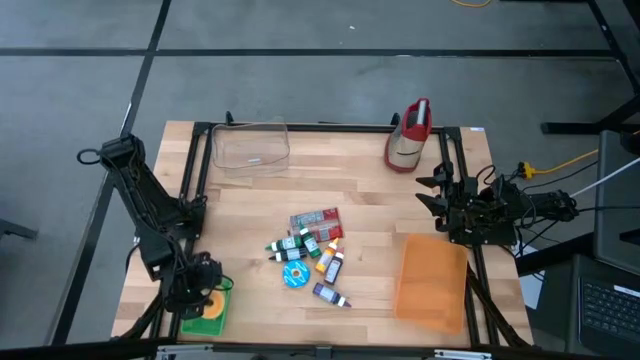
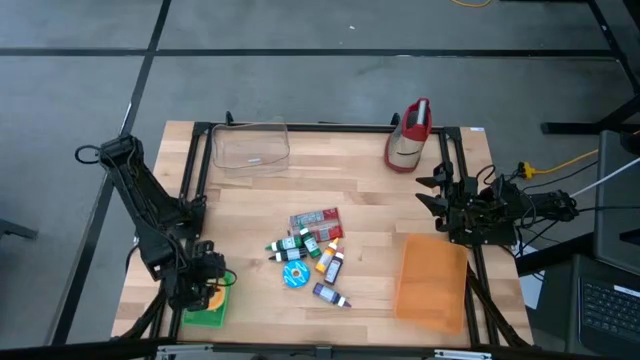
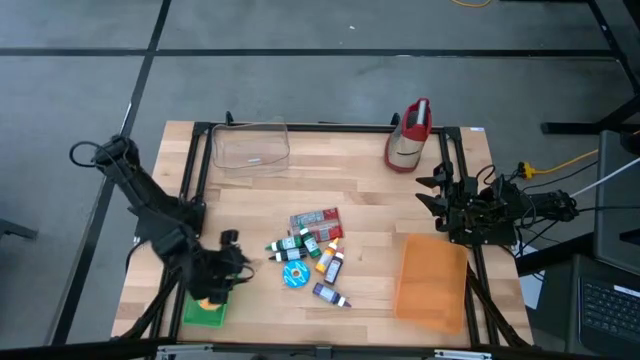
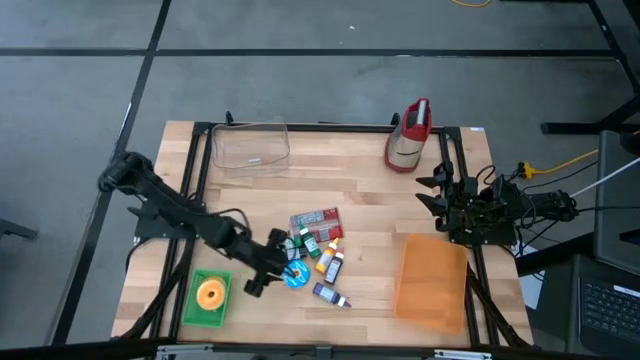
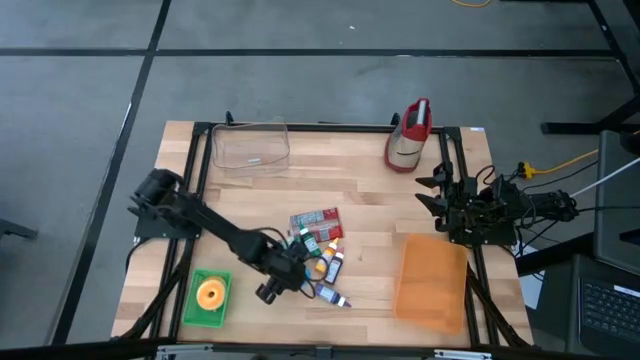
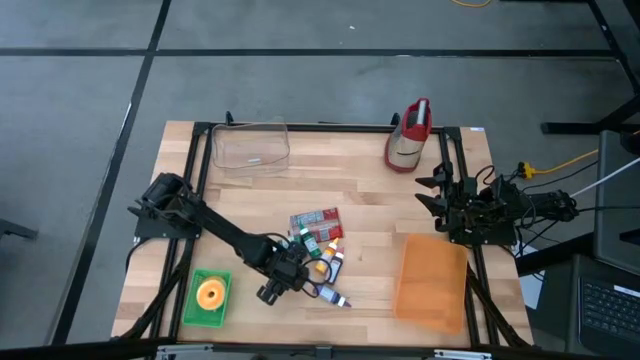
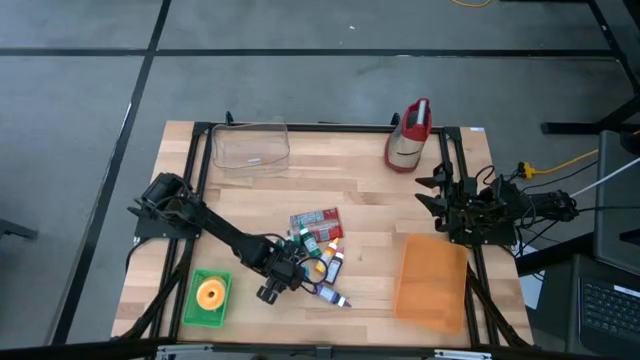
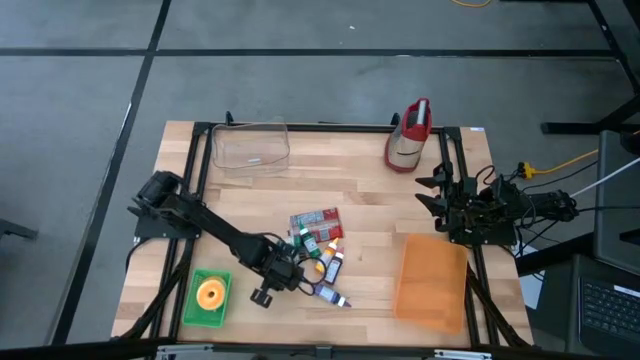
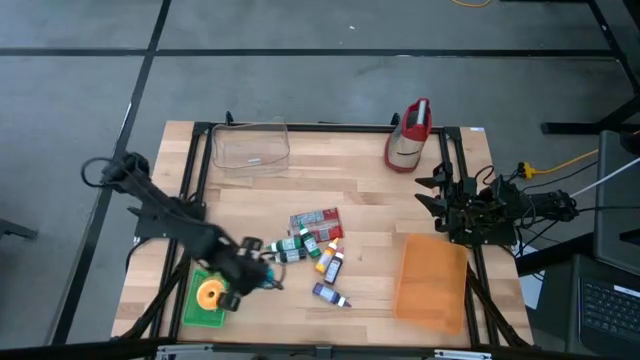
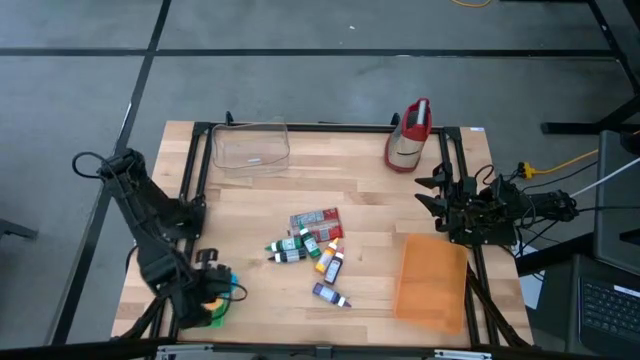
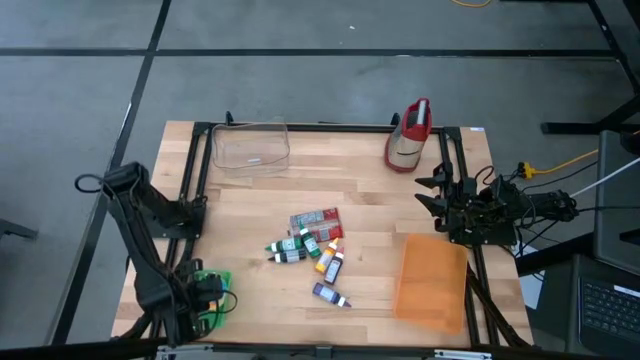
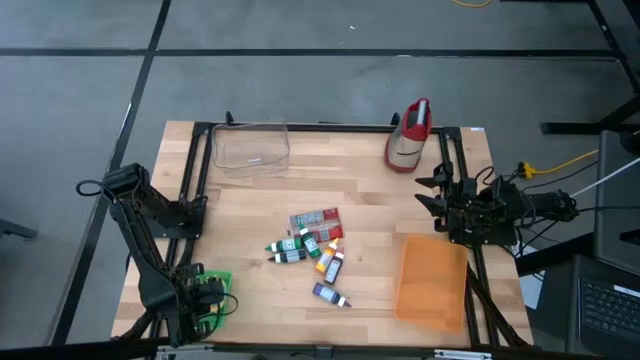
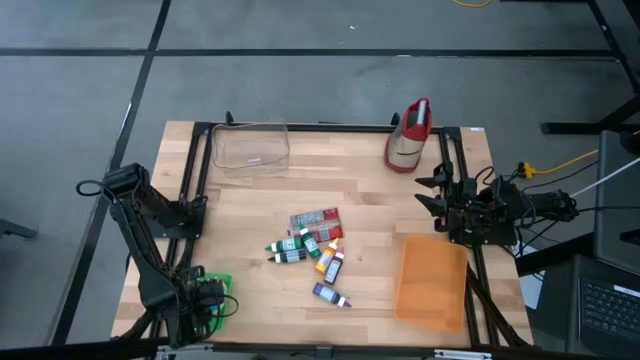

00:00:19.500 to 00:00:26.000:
Put the blue donut into the green bin

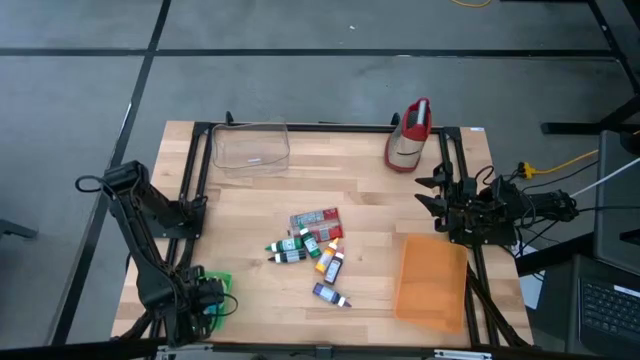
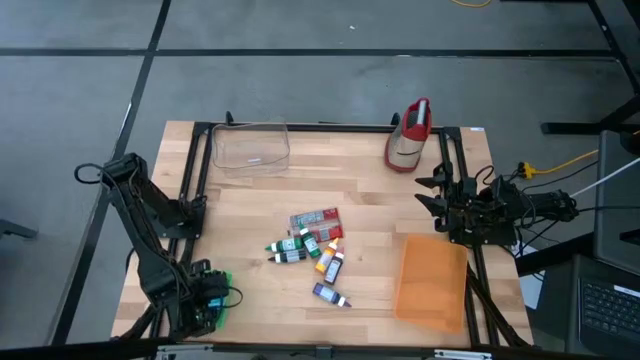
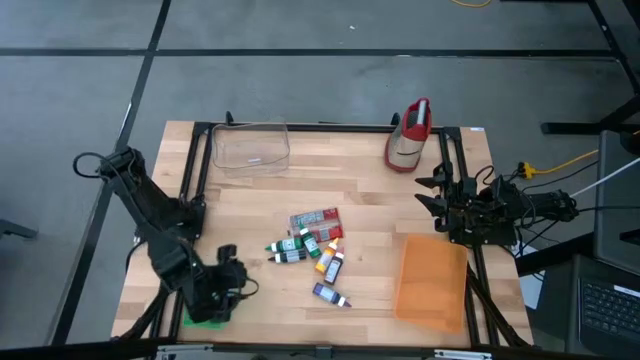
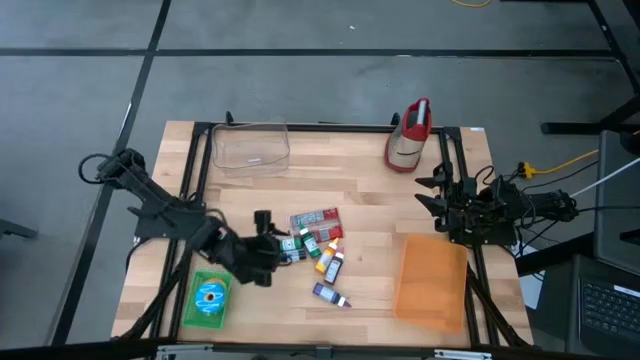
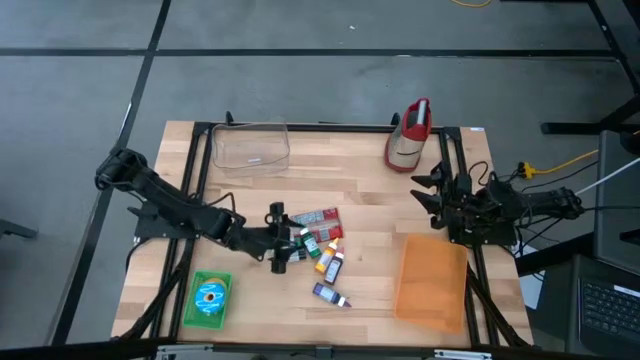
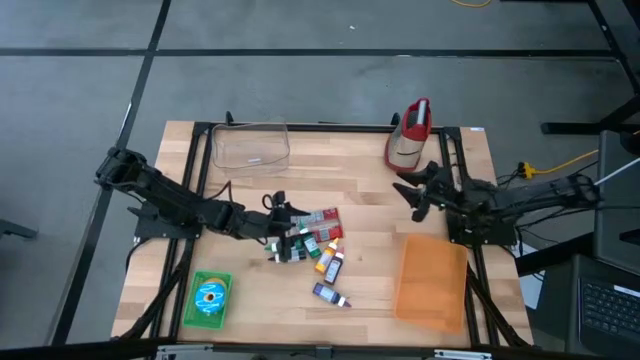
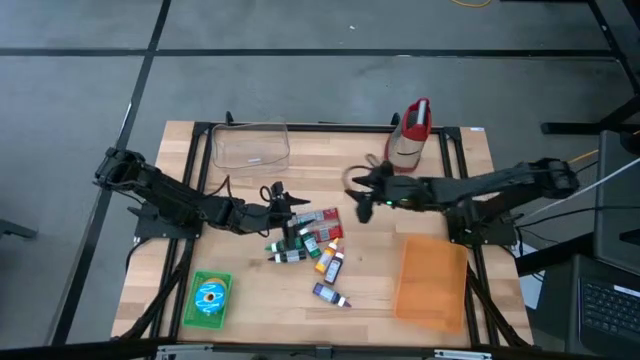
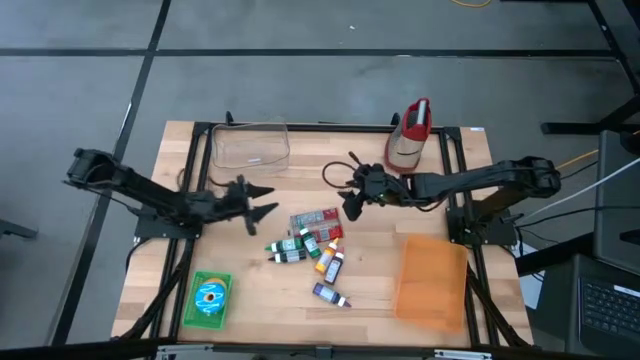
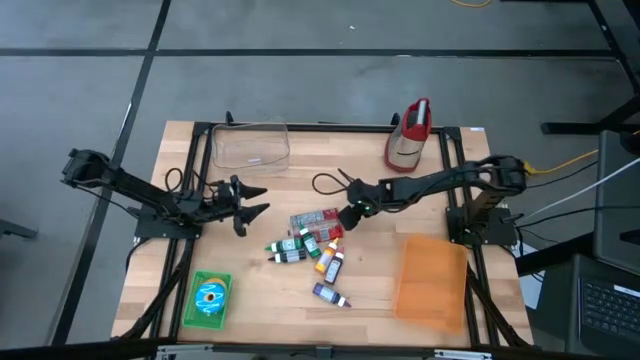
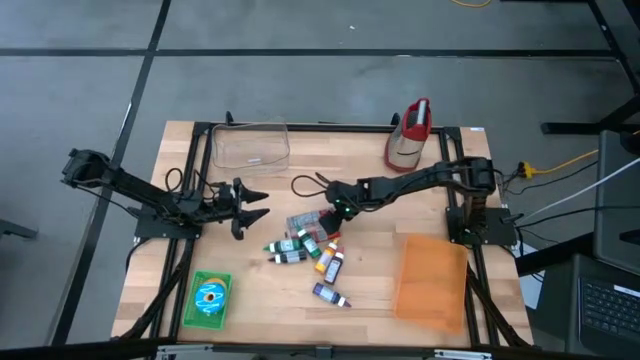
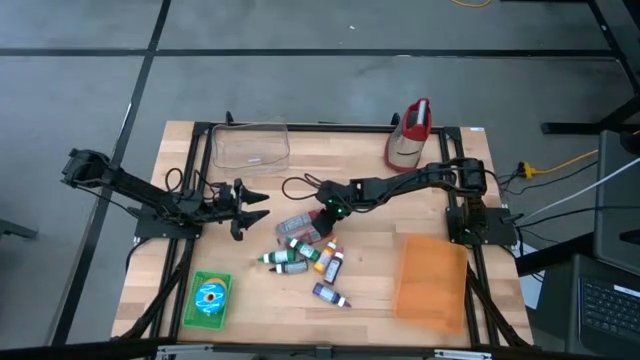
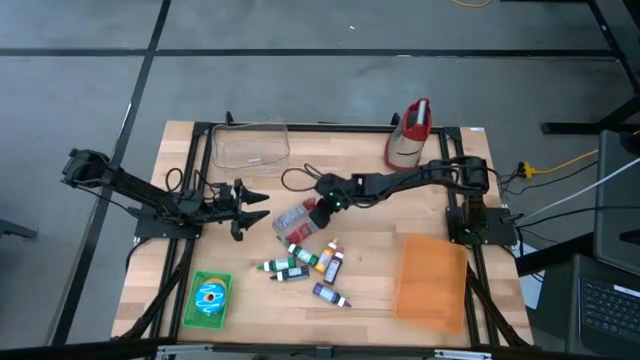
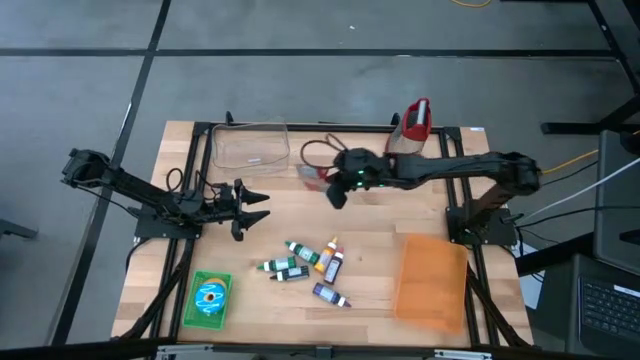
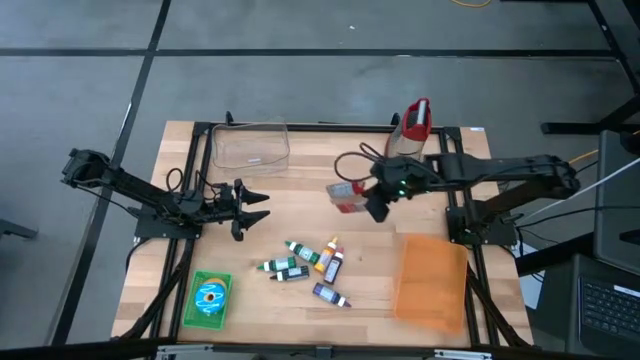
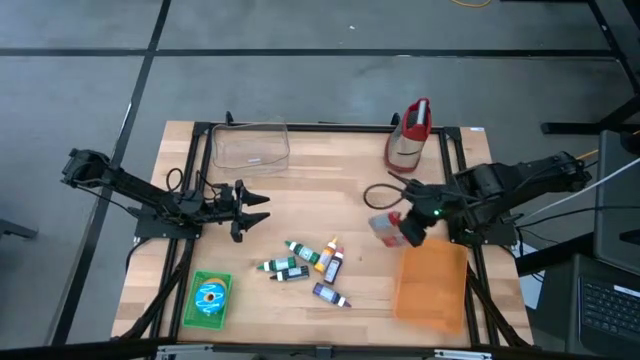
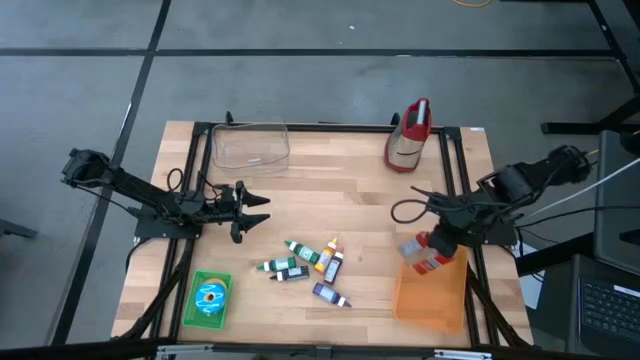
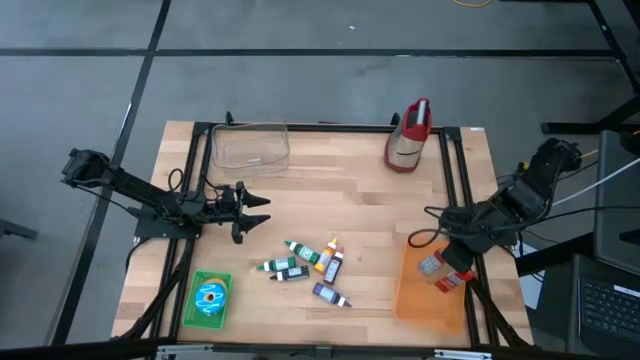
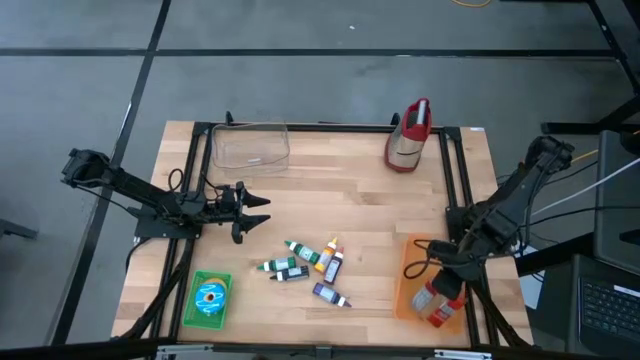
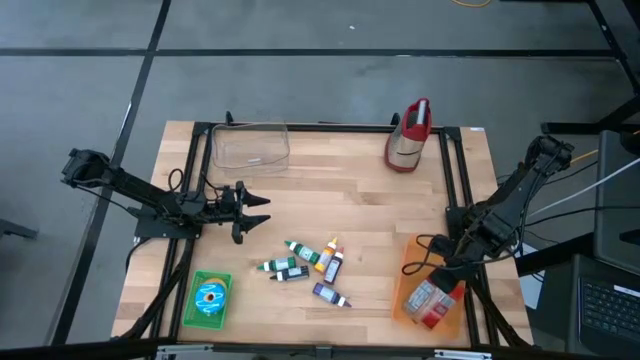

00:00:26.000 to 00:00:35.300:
Put the red popcorn bag into the orange bin

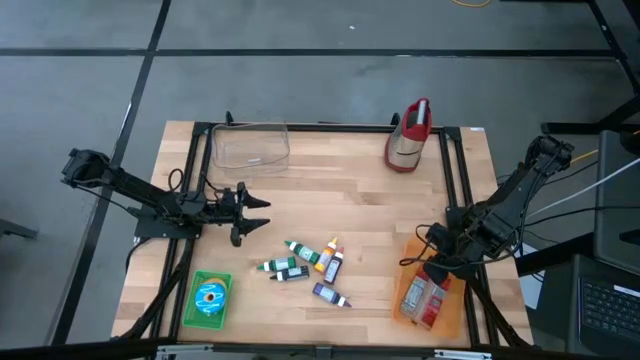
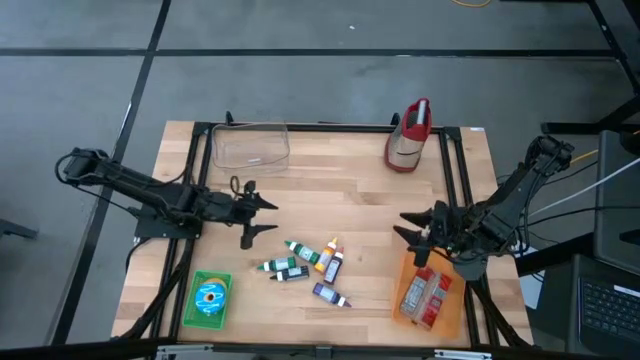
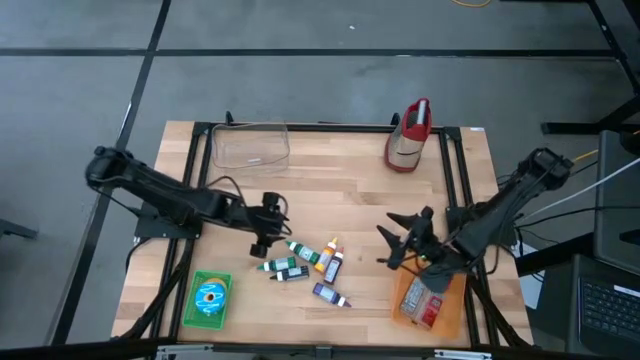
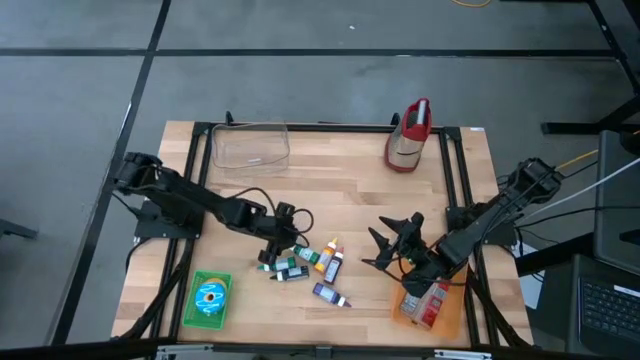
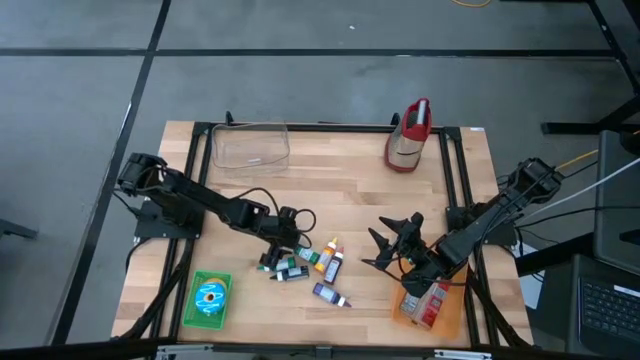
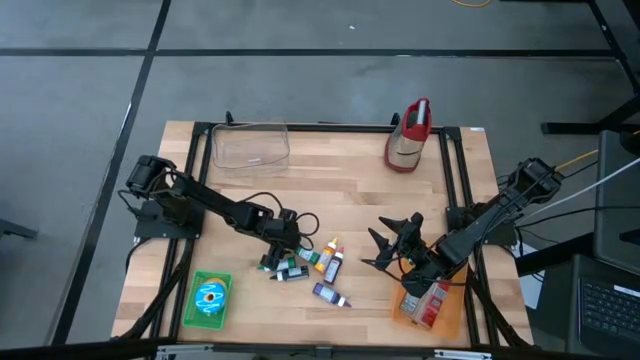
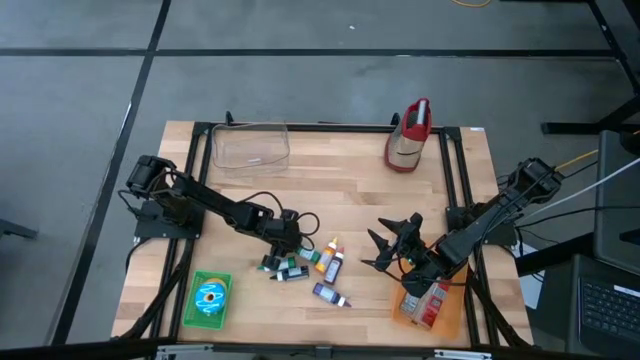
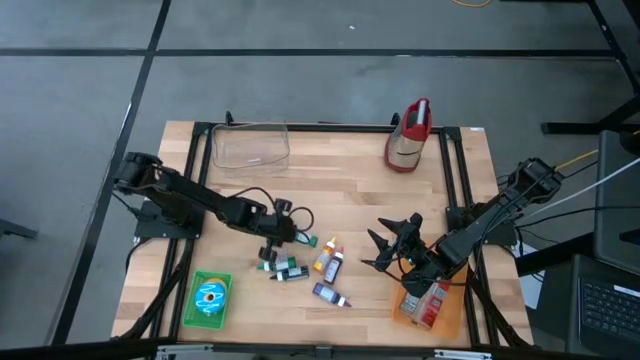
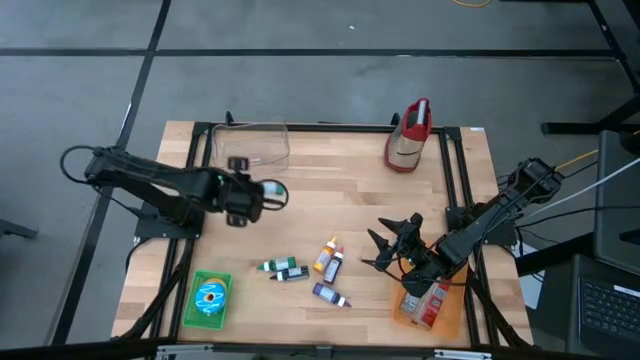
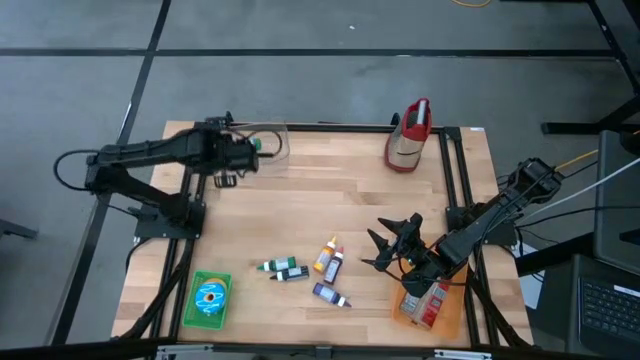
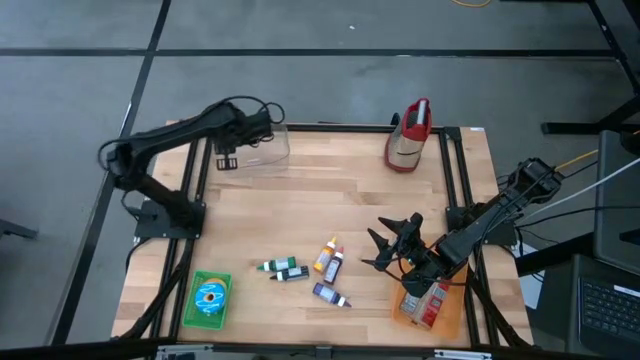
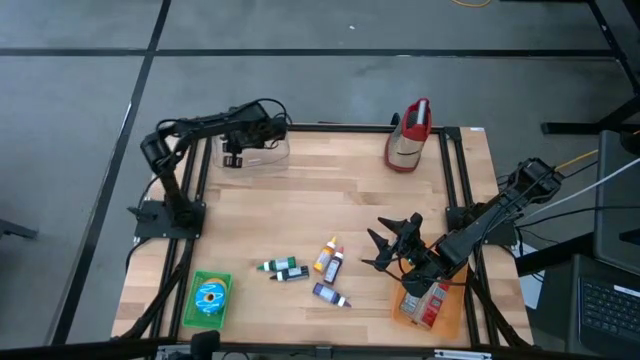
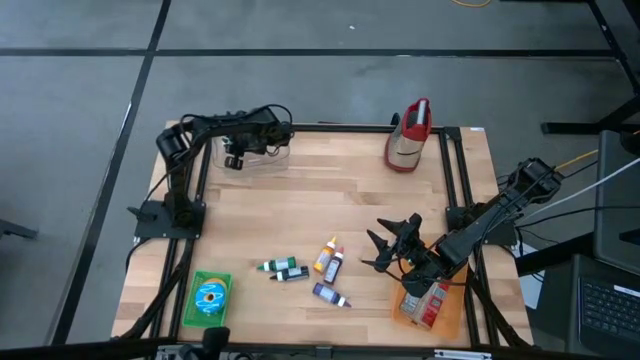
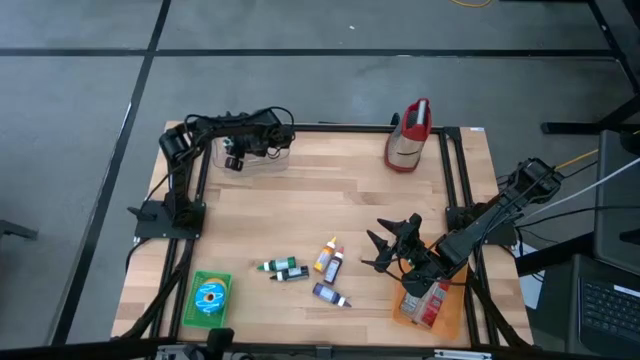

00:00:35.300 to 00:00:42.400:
Put the right green food coloring bottle into the white transparent bin
